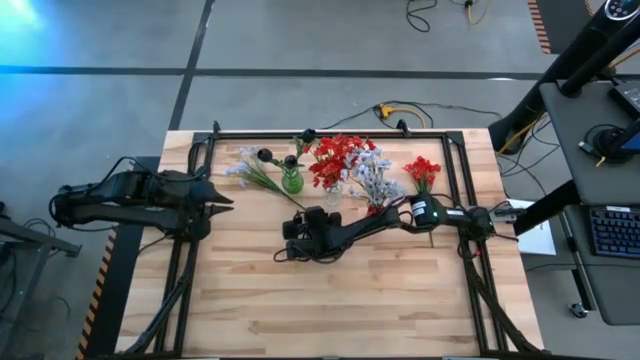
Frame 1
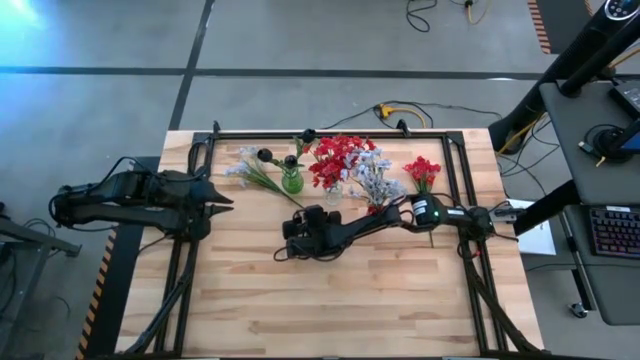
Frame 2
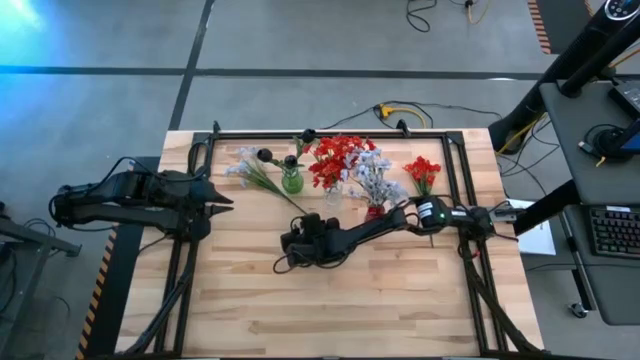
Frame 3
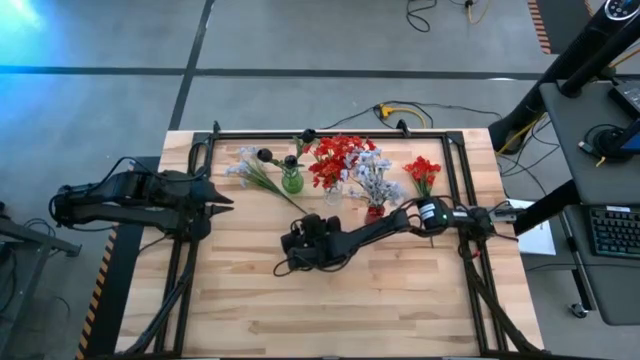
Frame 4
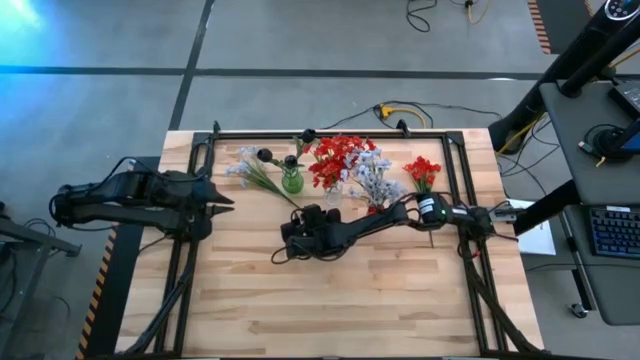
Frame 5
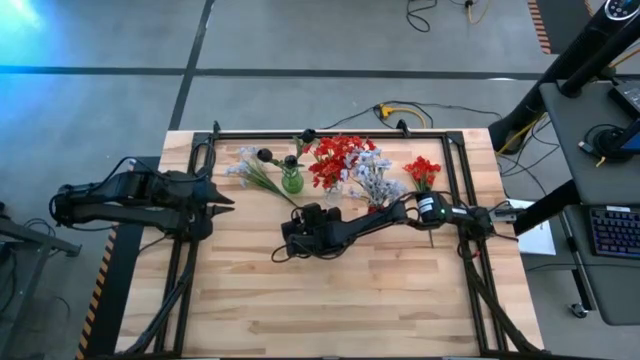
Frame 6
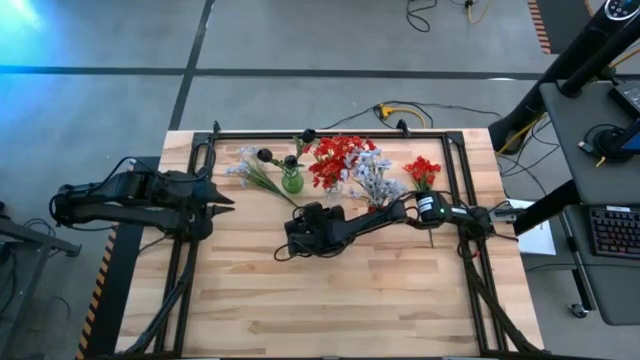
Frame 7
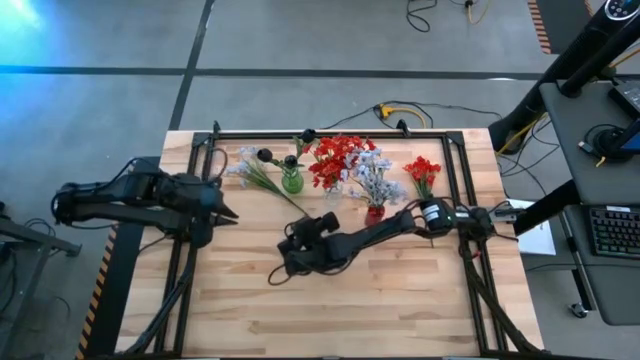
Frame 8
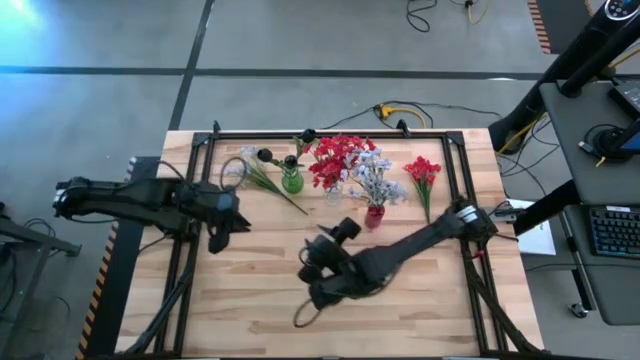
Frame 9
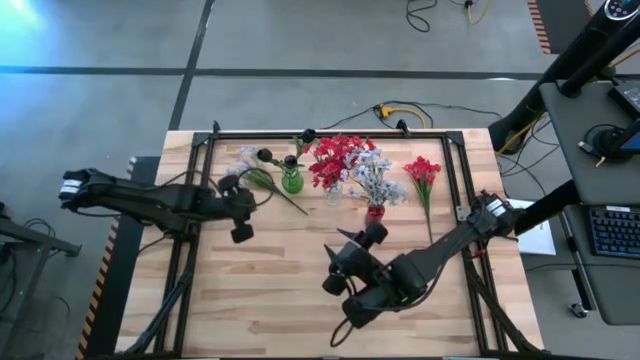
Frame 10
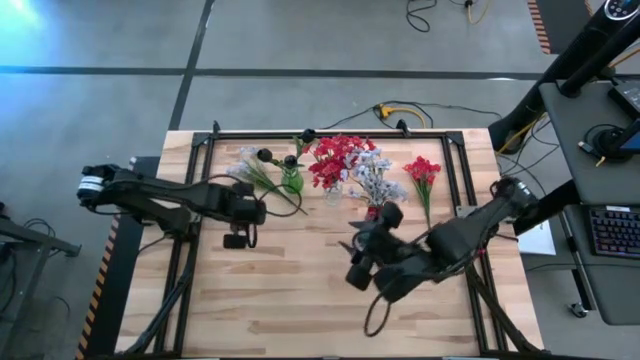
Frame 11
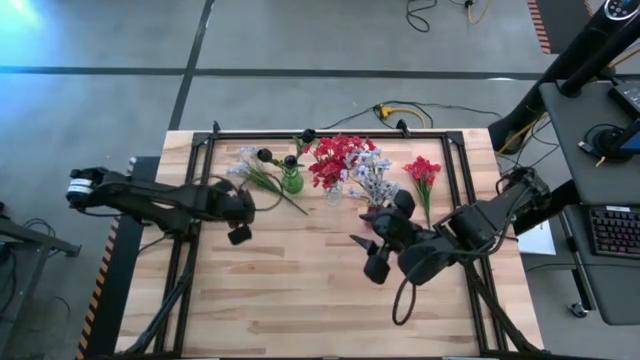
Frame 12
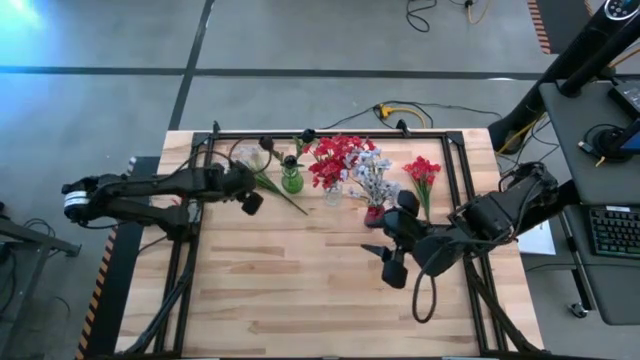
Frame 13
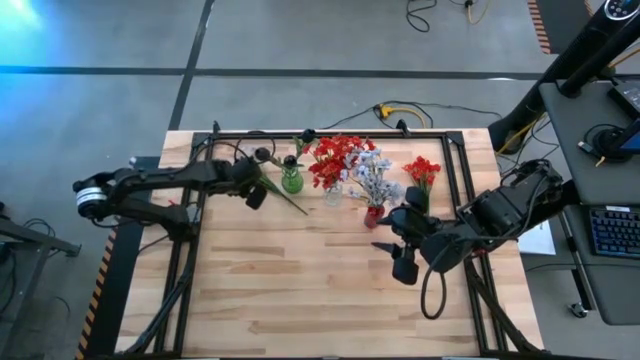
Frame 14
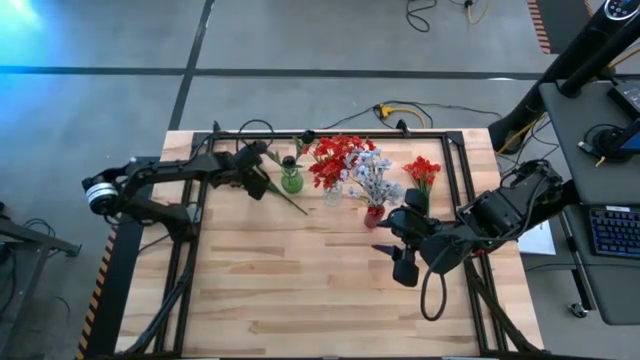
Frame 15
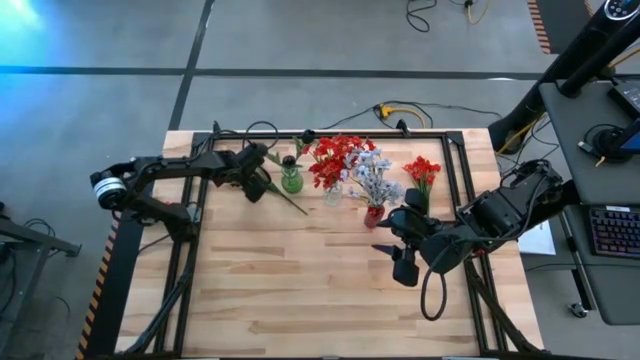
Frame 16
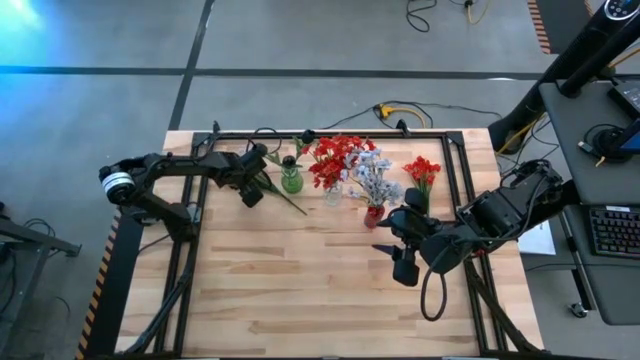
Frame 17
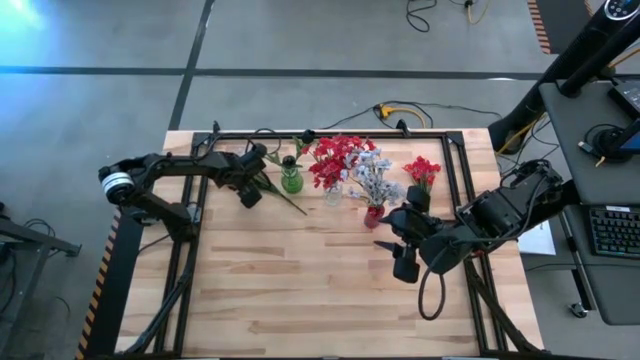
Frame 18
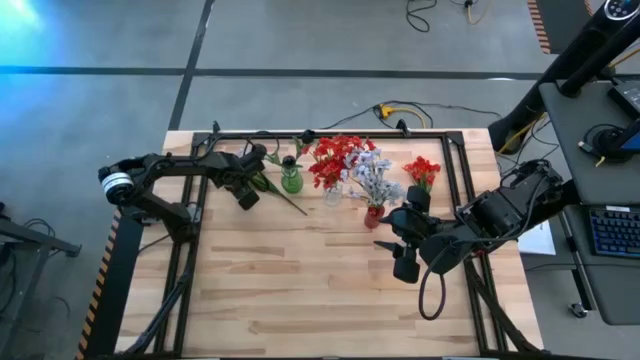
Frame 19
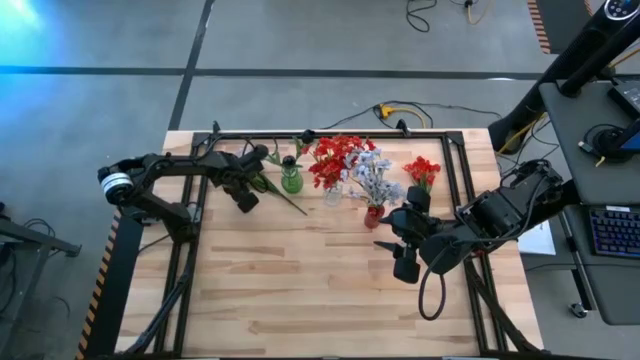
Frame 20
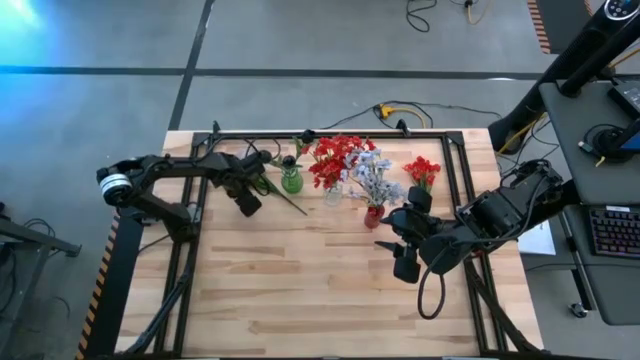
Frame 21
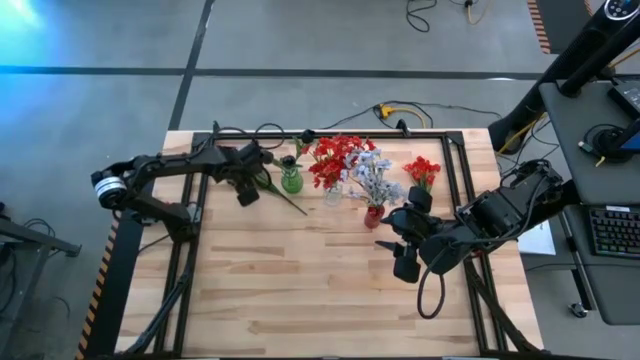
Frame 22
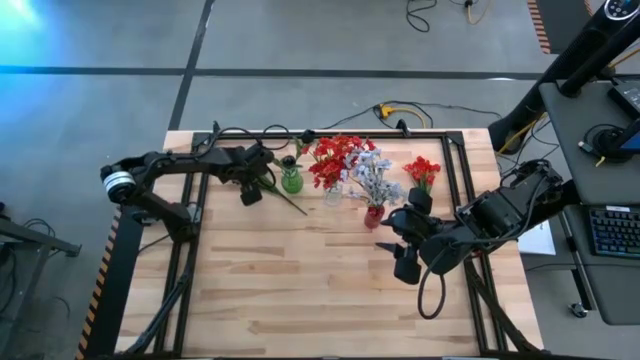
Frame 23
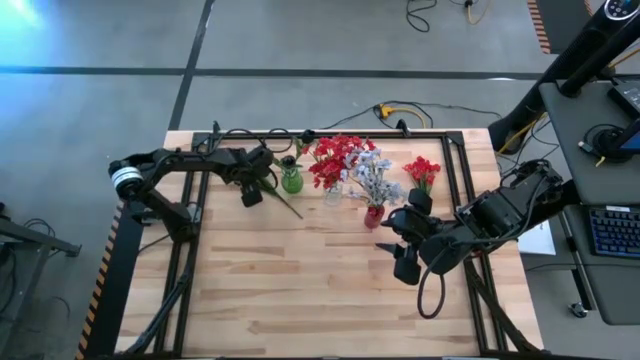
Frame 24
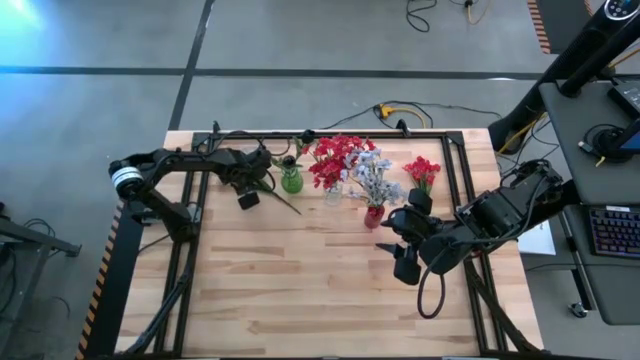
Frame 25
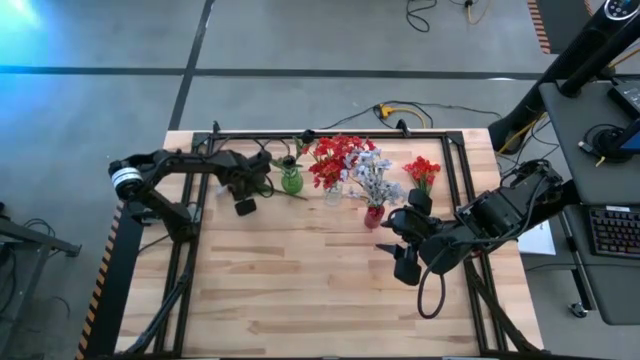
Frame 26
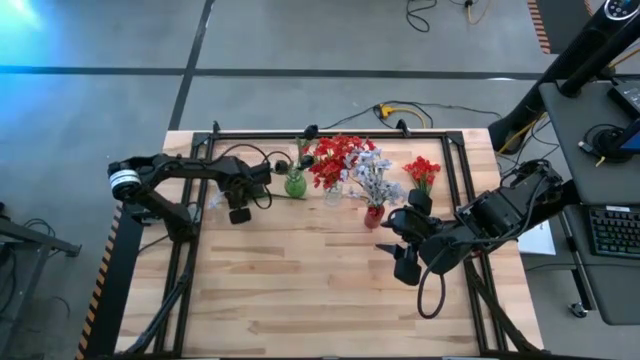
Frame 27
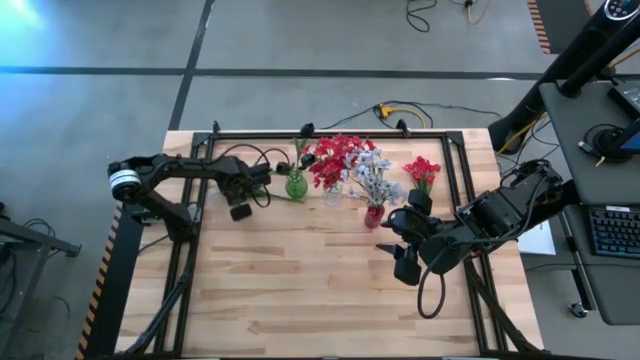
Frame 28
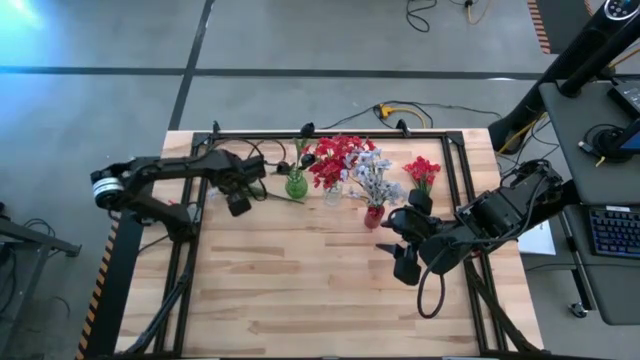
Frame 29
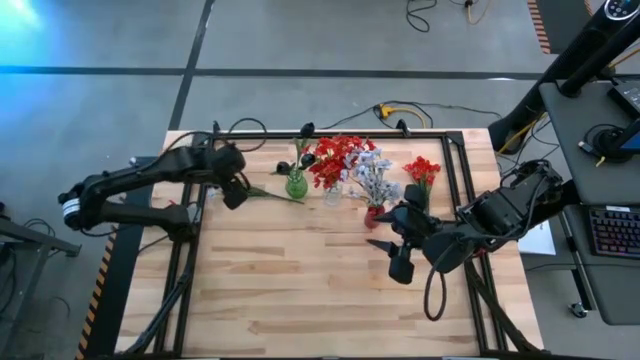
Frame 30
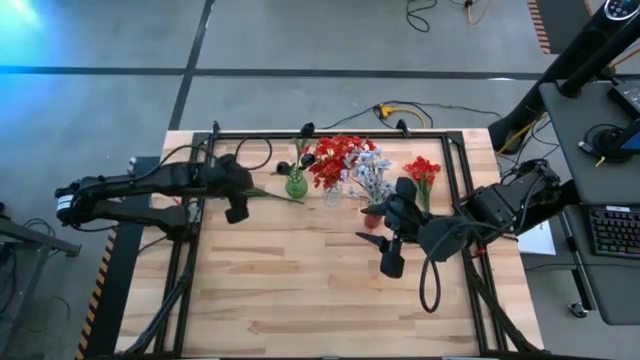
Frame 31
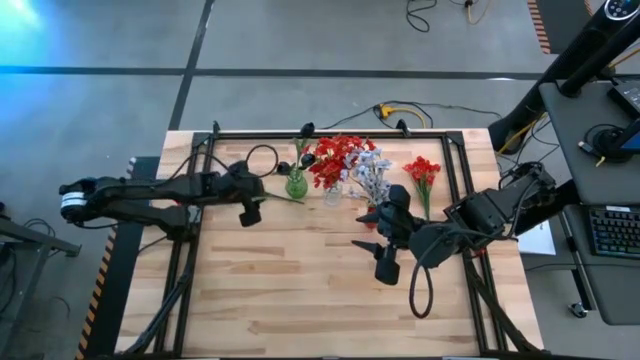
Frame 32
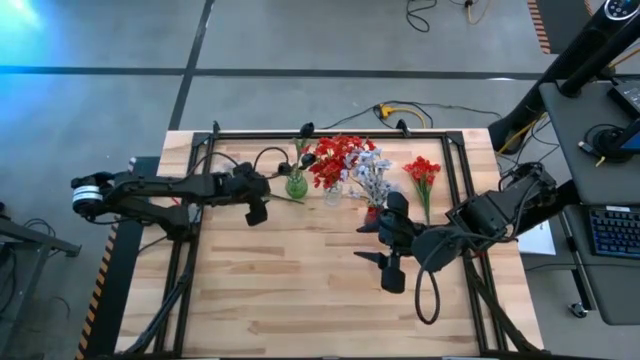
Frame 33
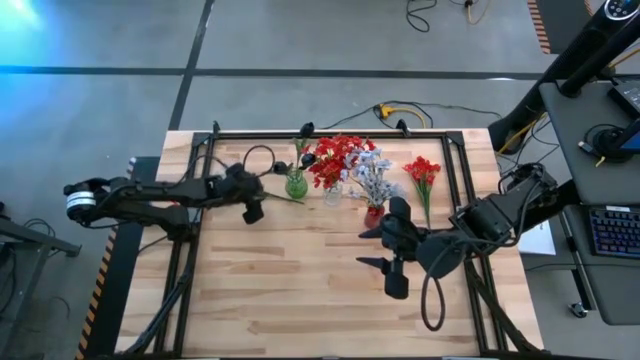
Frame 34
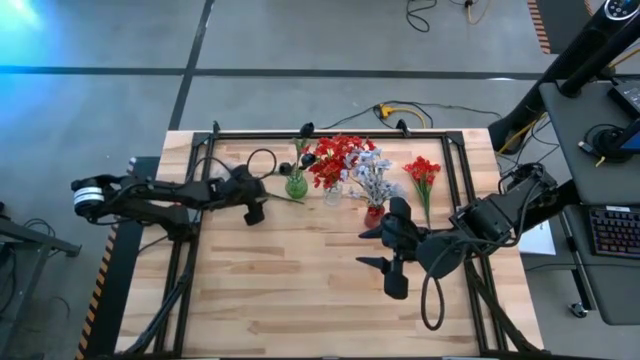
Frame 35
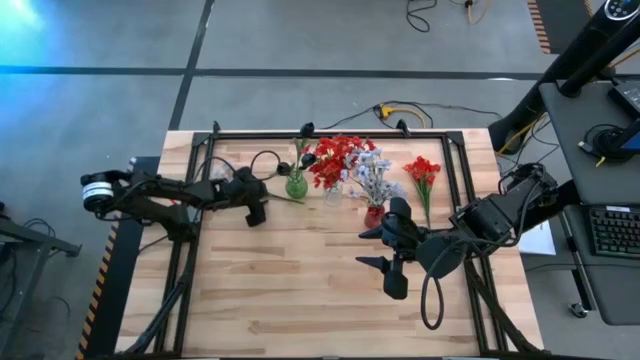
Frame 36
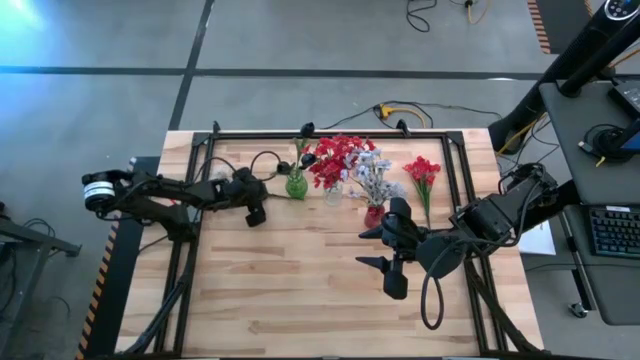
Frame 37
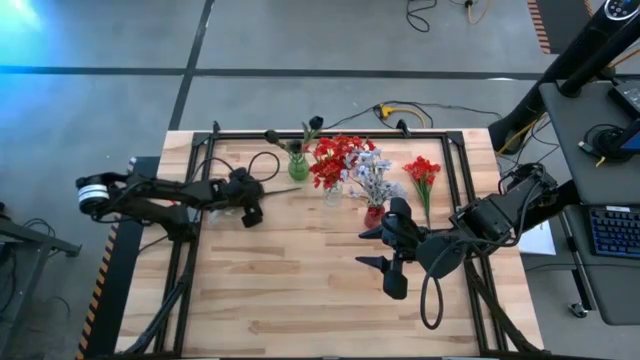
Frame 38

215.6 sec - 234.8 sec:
Task: Sort flowers into vase by color
Put the white flowers into the red vase

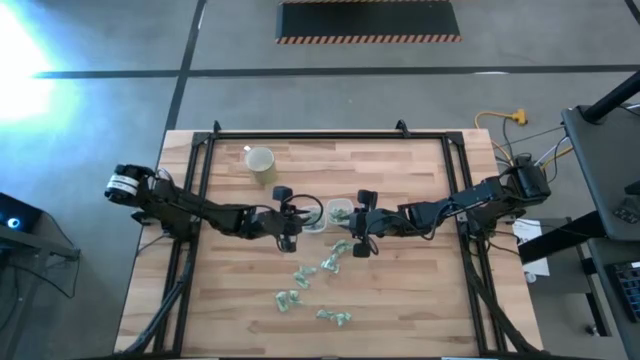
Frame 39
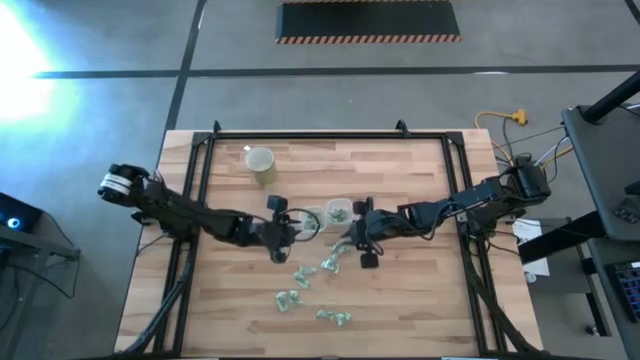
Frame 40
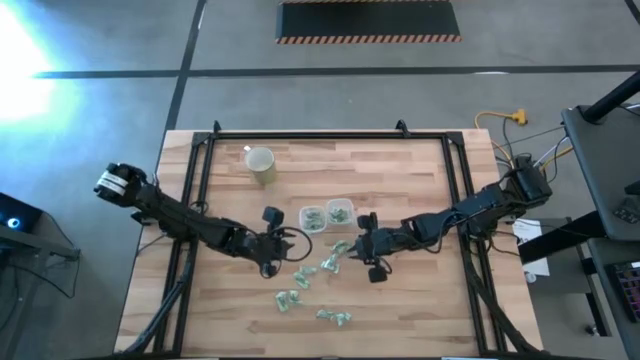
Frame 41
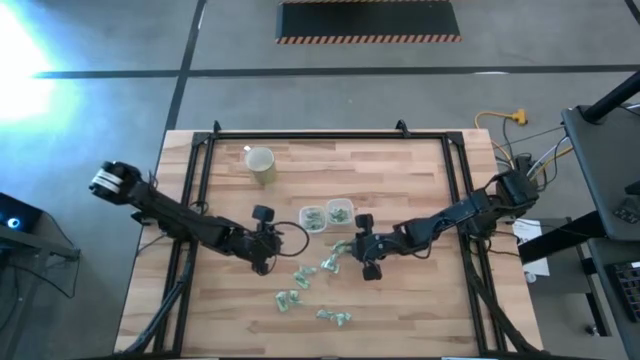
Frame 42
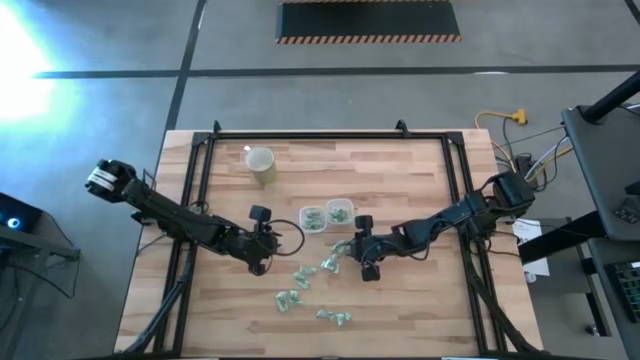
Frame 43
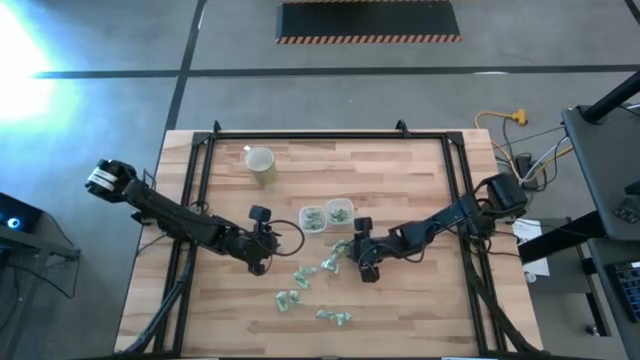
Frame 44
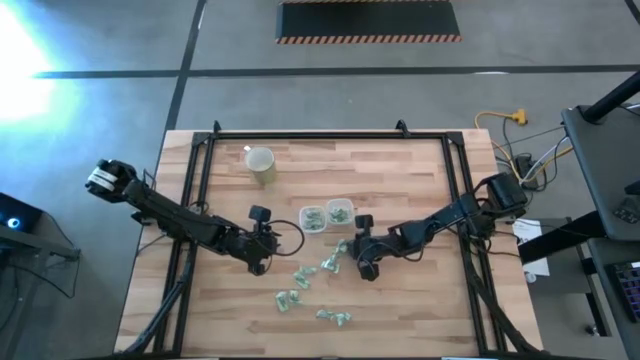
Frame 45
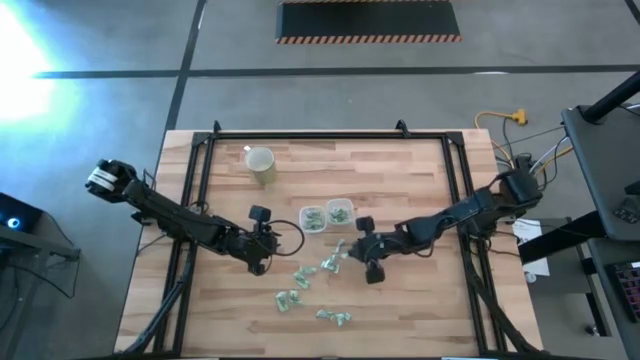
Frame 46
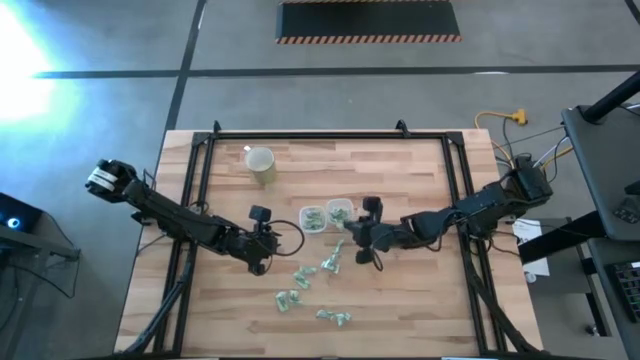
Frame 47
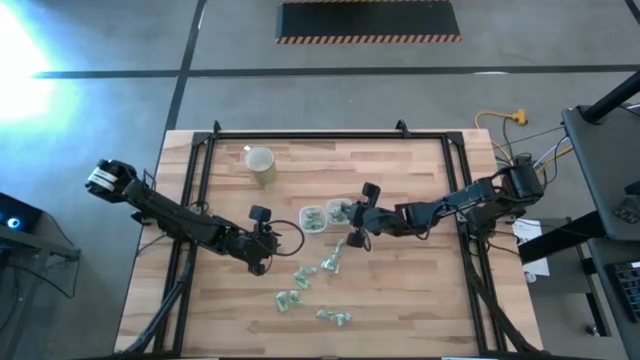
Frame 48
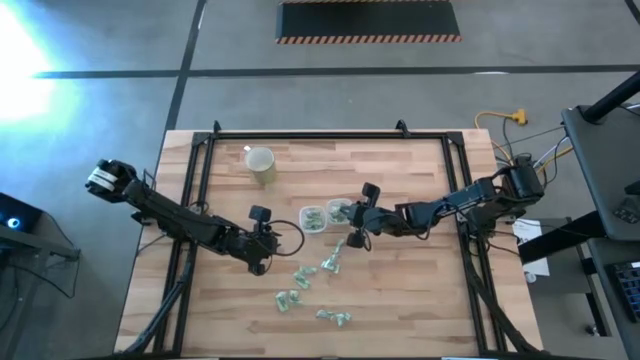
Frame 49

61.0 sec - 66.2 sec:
Task: Pick and place items into bin
Put the stevia packet into the right transparent bin
